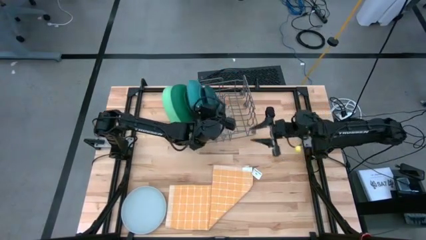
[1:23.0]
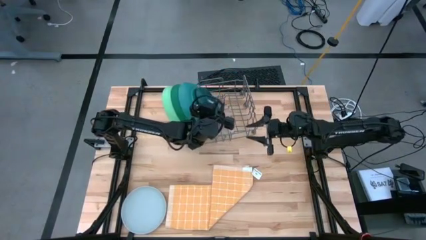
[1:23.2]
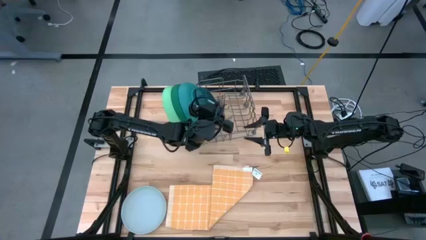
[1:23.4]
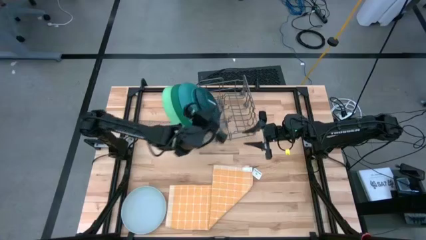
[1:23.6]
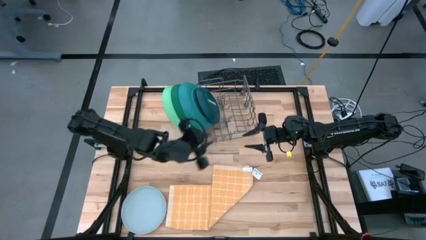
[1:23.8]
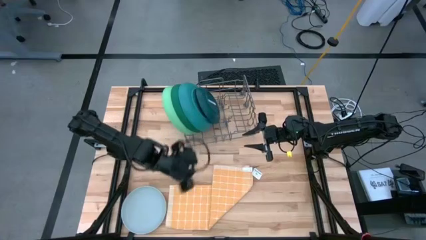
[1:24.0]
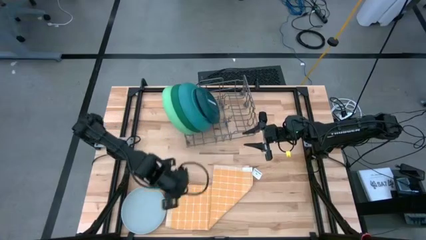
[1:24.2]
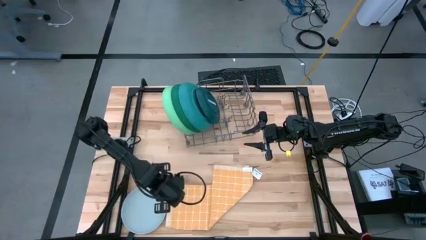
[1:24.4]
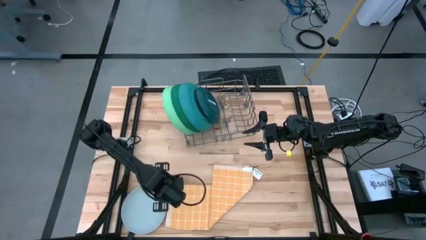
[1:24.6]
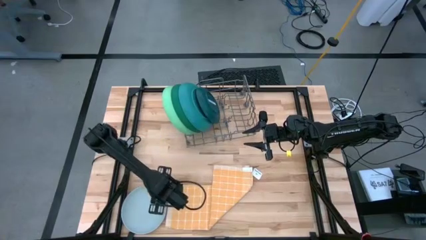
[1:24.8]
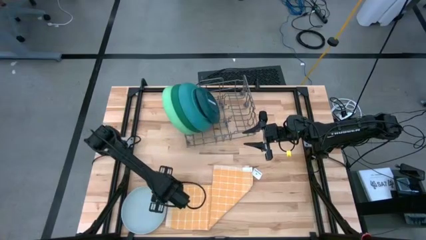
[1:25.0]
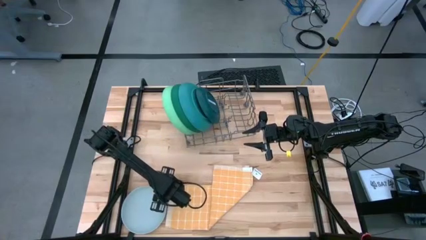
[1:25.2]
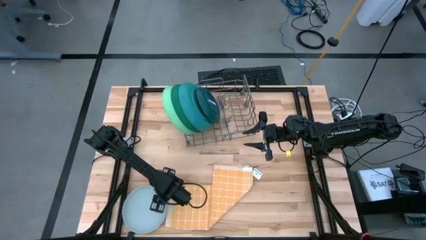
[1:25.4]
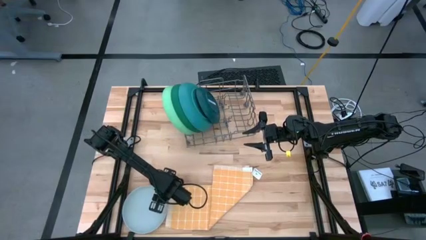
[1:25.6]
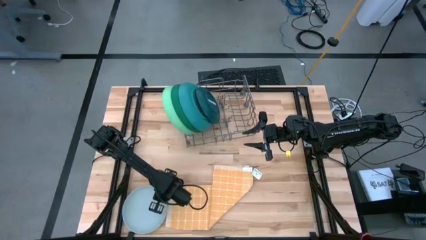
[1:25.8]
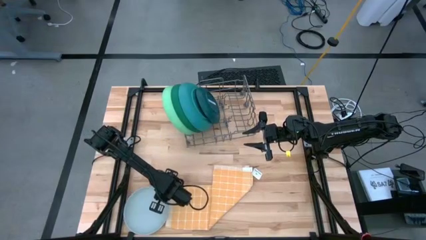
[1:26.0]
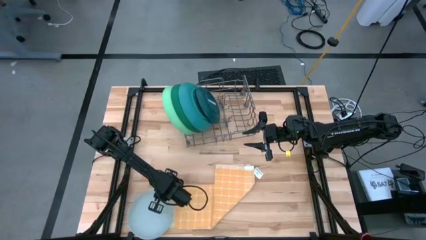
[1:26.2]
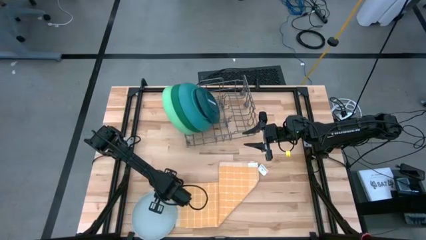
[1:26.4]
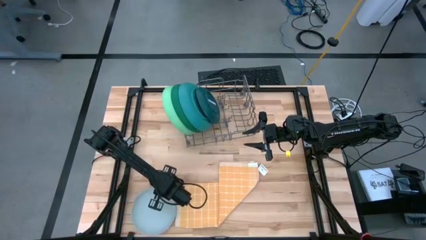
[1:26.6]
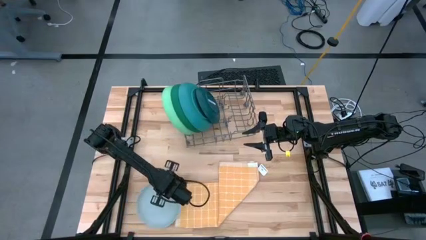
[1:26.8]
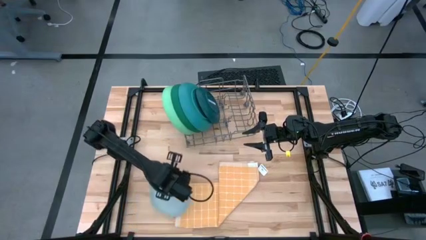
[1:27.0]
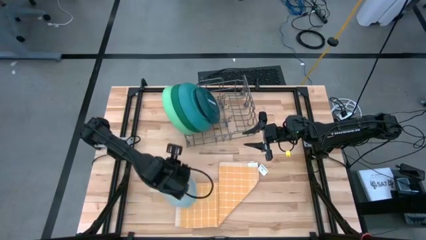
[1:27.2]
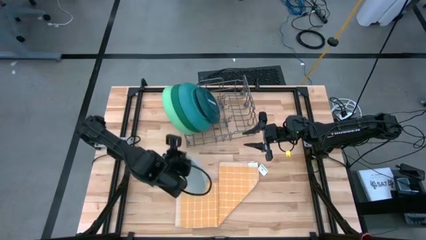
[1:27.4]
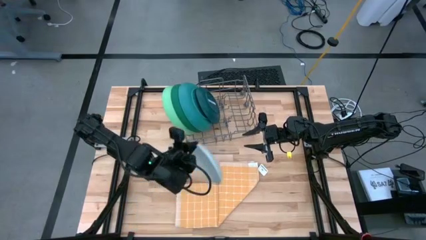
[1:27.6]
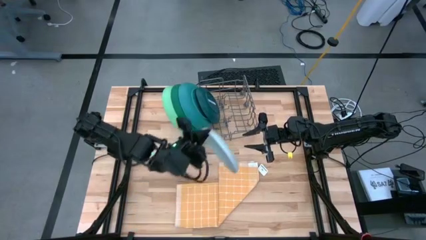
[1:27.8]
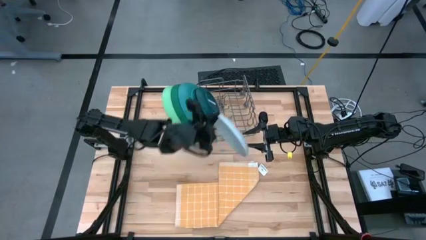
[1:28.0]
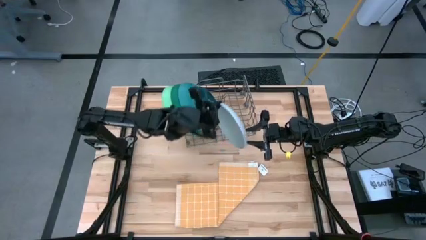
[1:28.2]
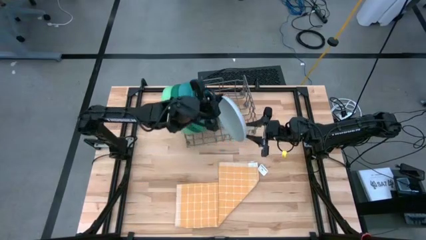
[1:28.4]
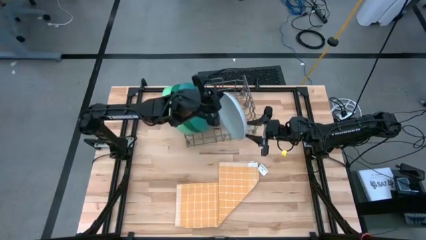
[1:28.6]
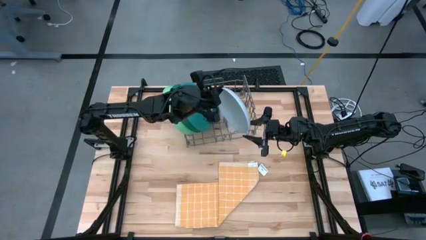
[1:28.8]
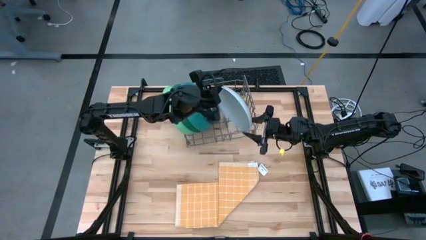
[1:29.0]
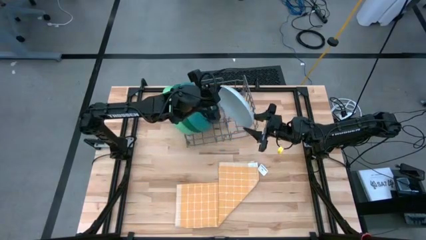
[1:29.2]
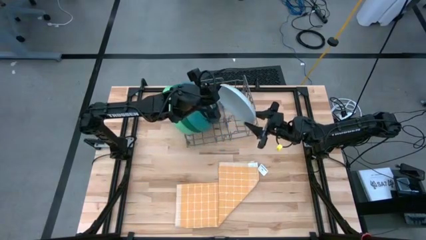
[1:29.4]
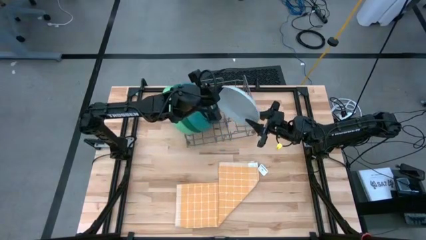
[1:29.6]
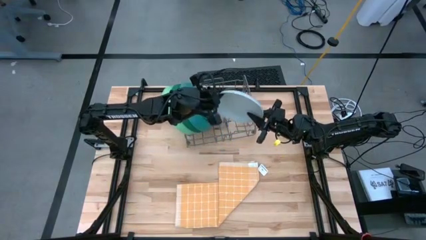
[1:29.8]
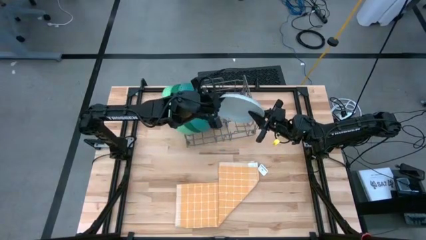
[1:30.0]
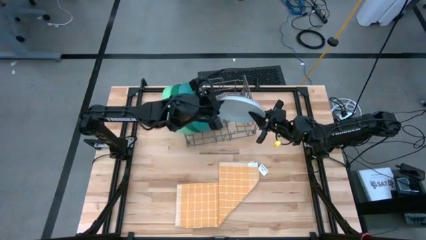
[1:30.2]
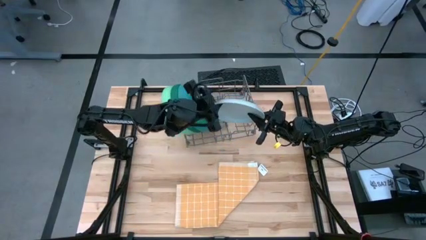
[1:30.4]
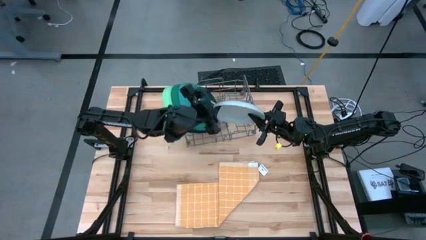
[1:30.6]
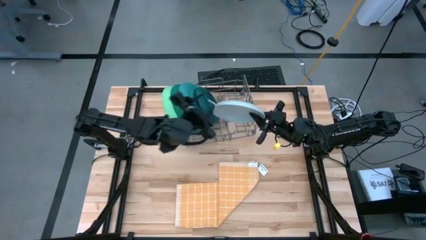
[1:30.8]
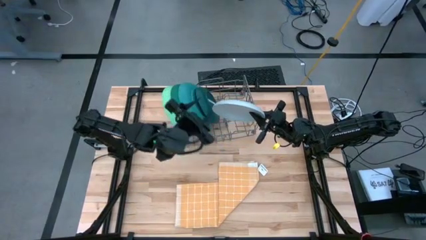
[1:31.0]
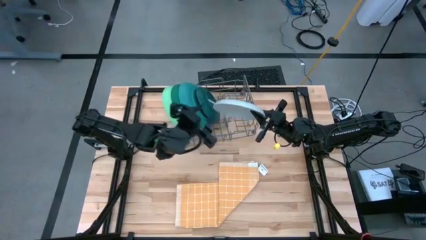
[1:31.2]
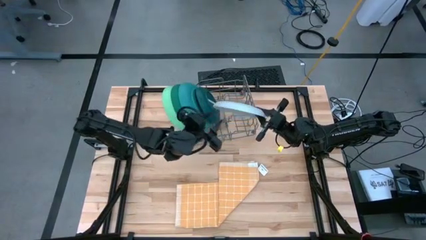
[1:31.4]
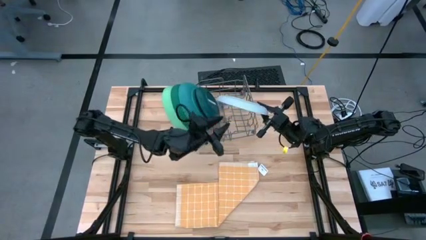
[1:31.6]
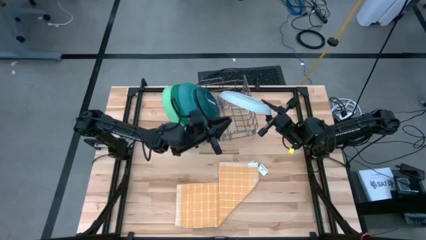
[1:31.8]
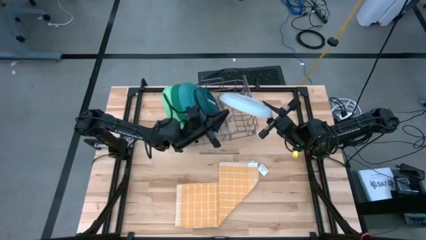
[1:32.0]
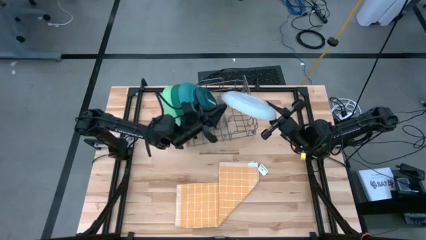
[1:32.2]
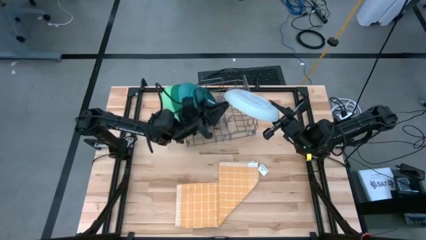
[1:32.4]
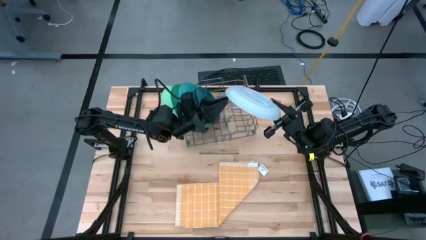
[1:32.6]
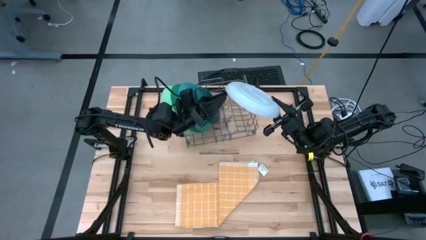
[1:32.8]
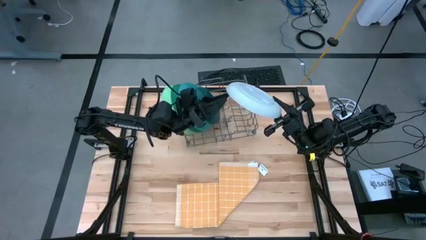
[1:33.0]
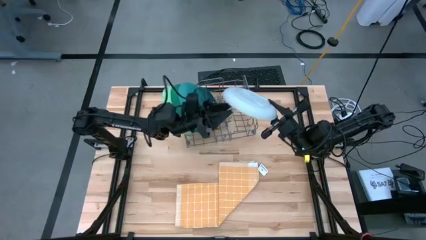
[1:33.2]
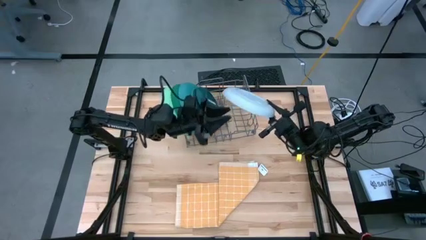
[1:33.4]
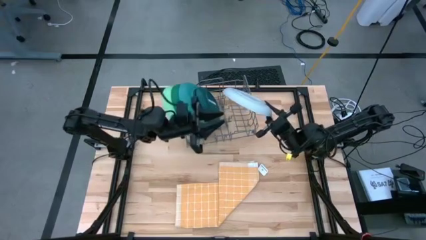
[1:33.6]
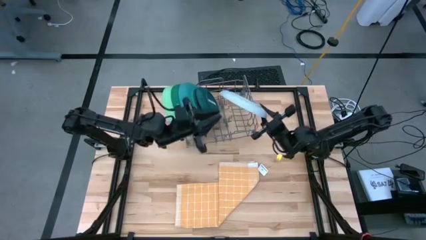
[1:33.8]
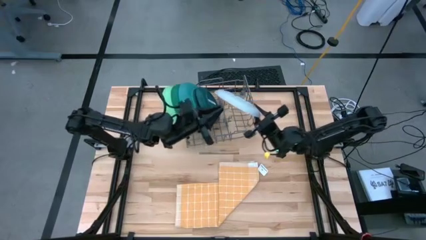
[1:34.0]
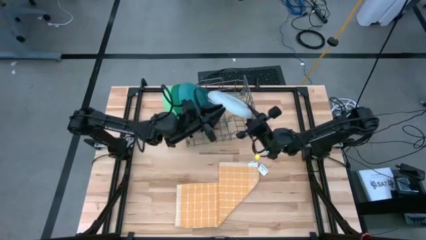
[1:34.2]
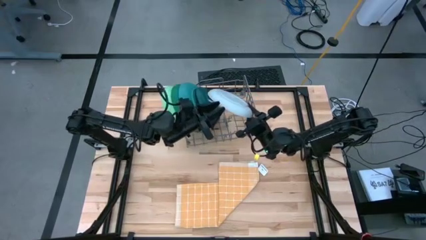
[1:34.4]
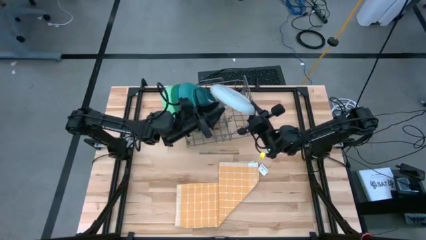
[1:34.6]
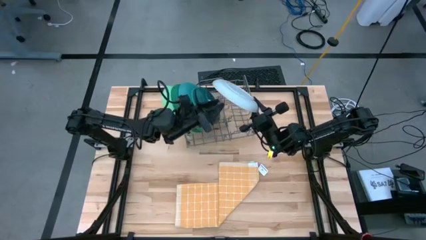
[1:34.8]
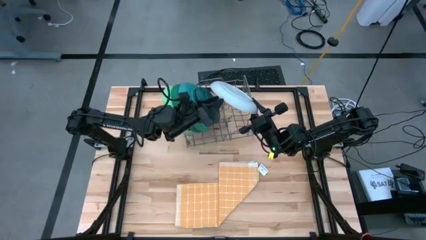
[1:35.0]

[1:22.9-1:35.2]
Task: Sort dishes
Put the white plate on the dish rack

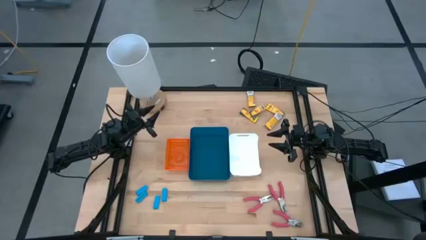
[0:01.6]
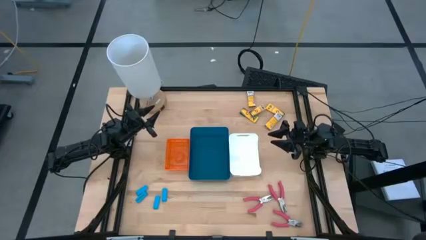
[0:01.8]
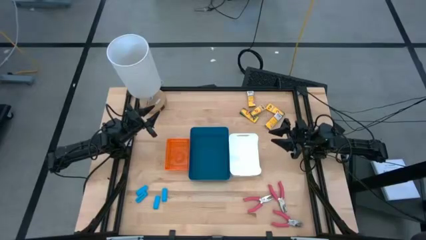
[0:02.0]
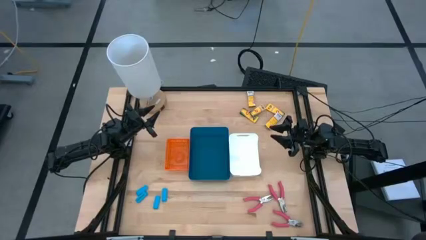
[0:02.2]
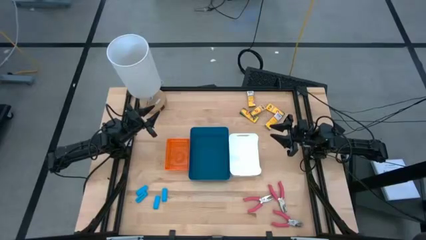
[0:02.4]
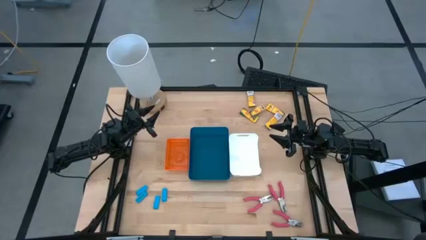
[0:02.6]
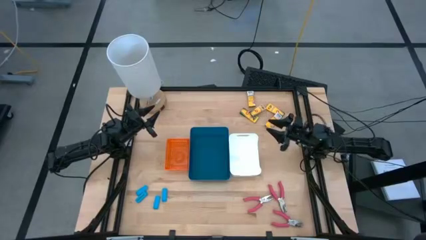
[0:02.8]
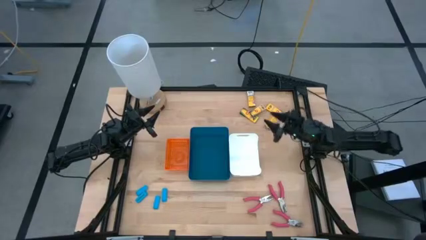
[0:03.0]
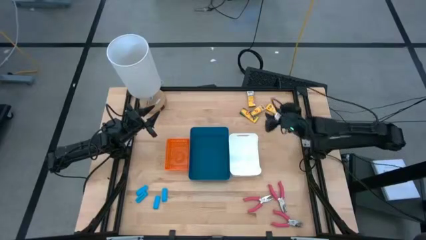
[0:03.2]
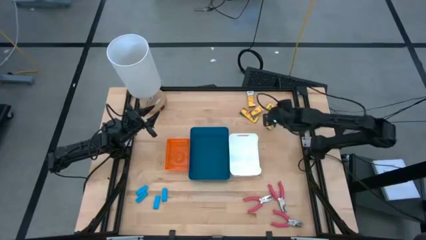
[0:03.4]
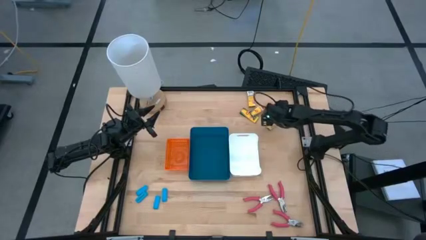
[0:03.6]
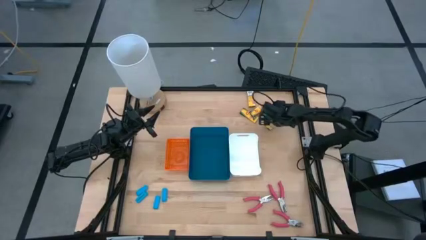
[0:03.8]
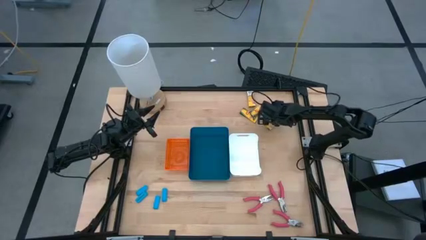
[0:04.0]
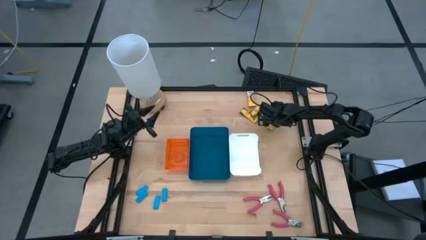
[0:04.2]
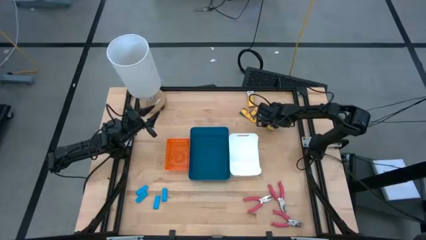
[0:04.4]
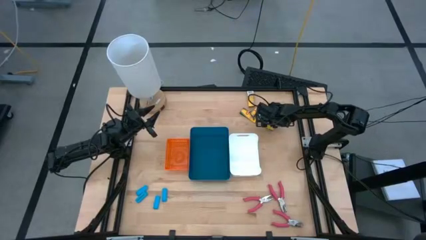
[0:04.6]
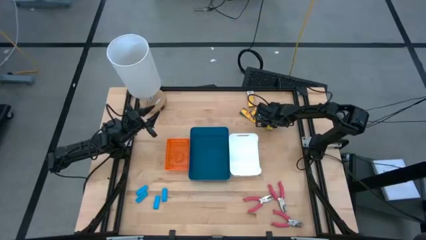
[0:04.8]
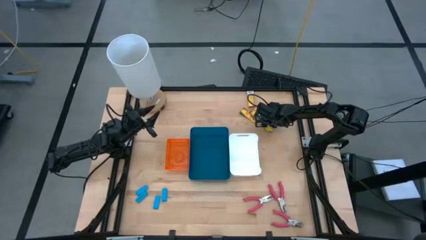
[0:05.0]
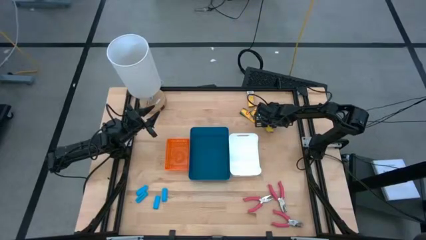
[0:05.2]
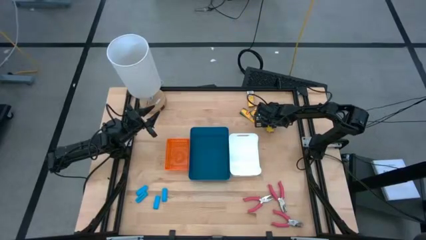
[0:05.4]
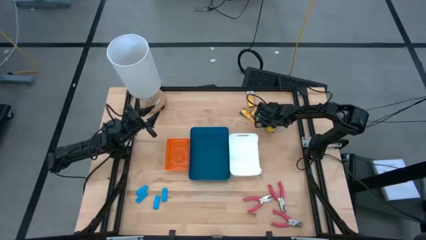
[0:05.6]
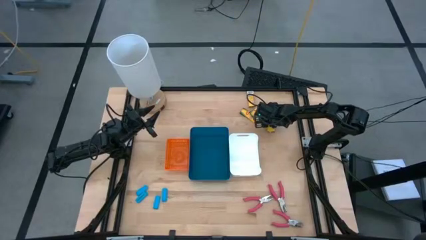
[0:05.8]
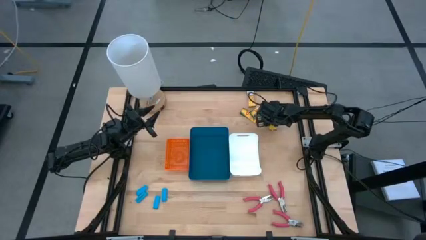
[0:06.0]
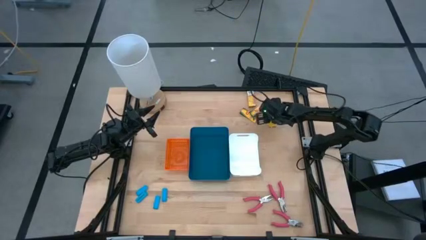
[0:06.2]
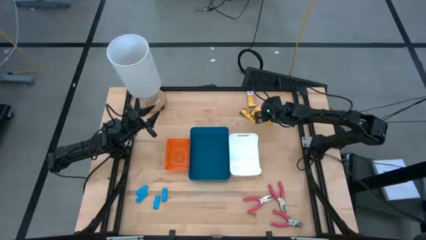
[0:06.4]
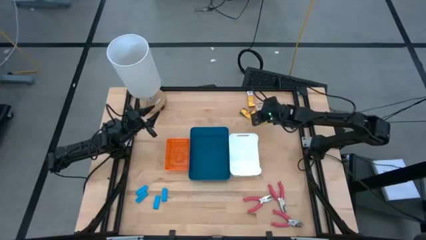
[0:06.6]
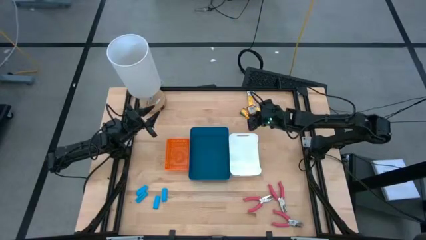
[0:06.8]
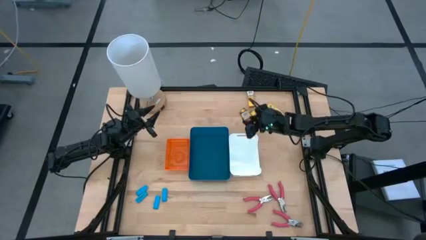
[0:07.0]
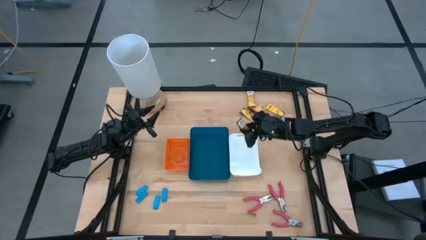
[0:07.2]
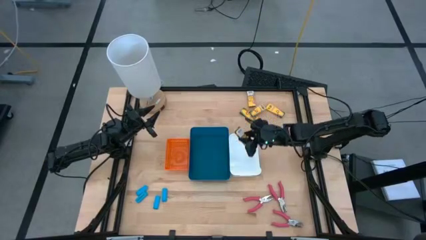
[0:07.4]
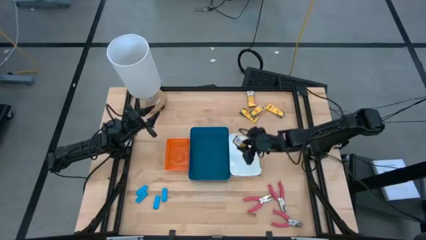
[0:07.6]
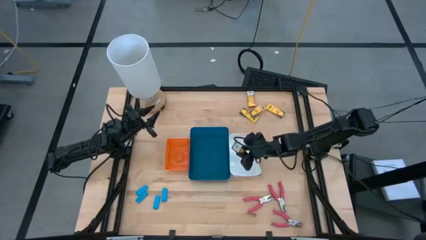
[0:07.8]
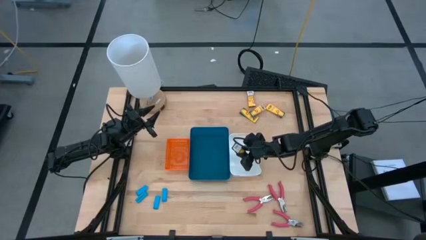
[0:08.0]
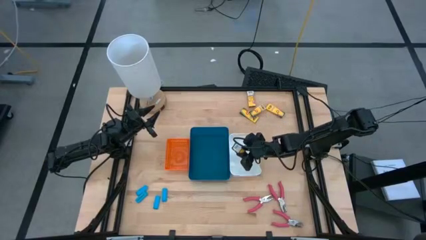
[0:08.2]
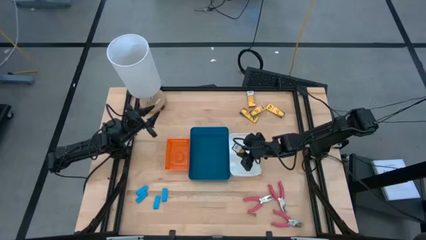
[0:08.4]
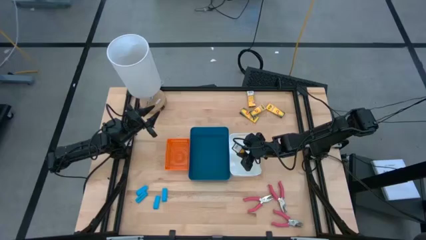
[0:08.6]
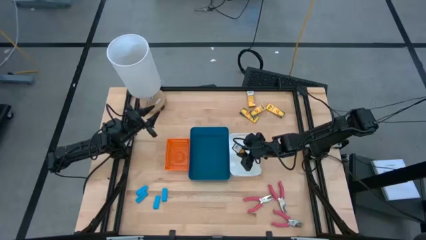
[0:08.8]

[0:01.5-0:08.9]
Task: Pick & Place School Supplies
Put the yellow crayon box into the white bin
